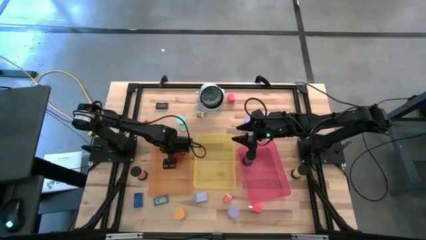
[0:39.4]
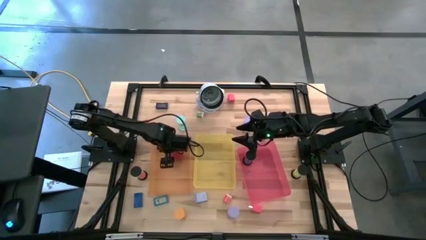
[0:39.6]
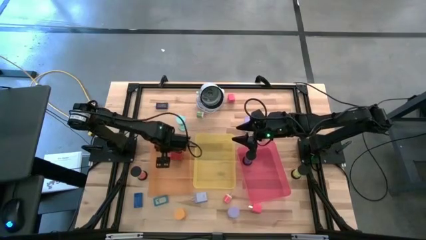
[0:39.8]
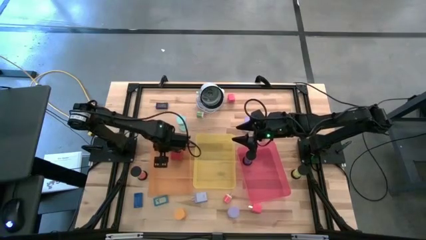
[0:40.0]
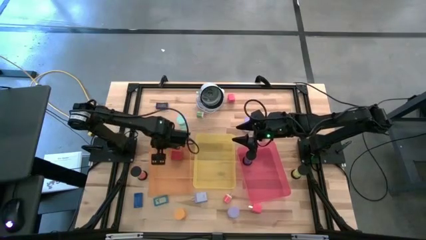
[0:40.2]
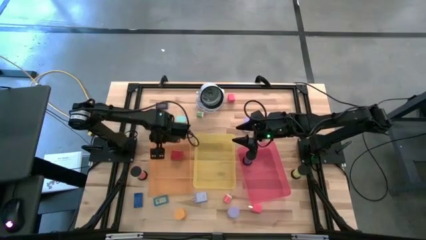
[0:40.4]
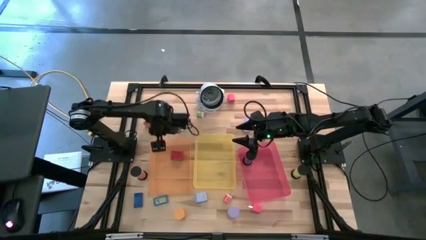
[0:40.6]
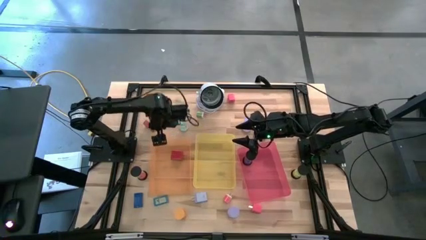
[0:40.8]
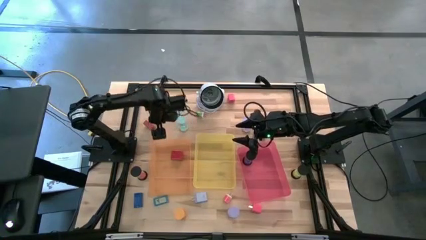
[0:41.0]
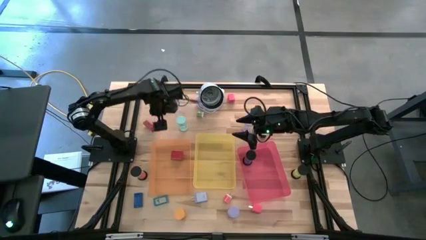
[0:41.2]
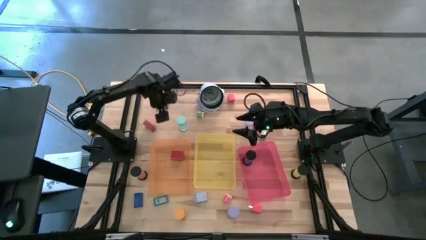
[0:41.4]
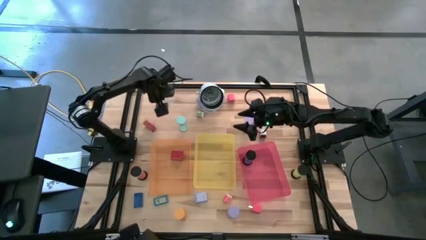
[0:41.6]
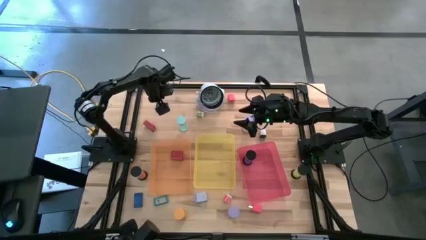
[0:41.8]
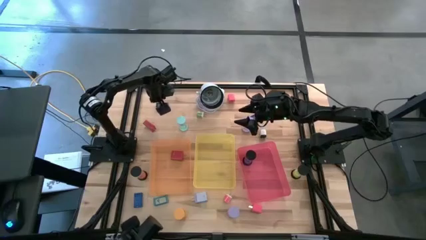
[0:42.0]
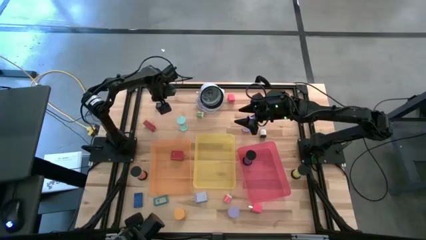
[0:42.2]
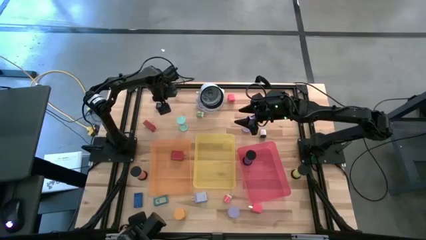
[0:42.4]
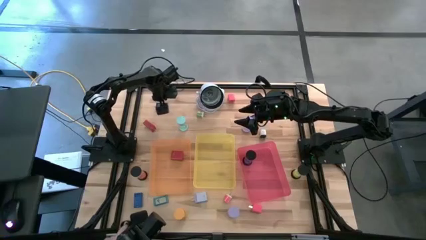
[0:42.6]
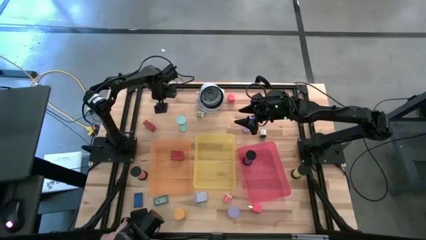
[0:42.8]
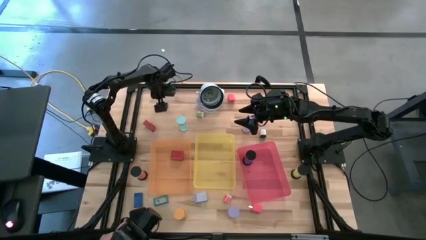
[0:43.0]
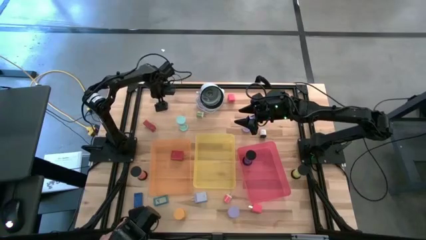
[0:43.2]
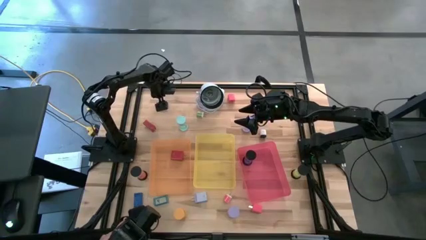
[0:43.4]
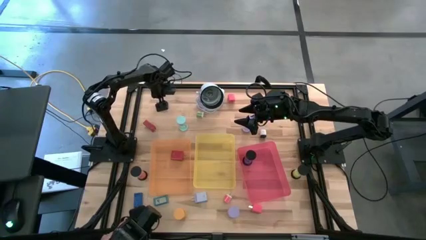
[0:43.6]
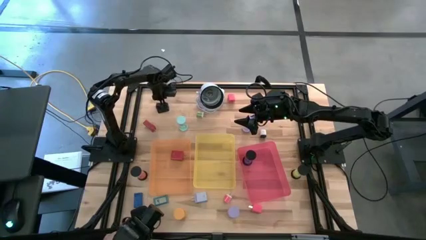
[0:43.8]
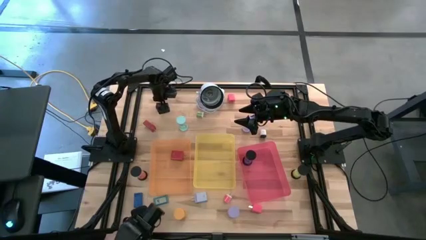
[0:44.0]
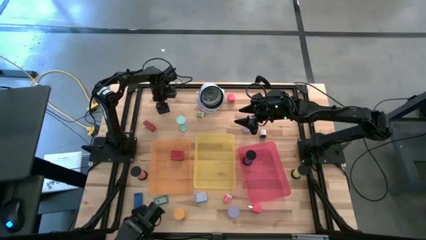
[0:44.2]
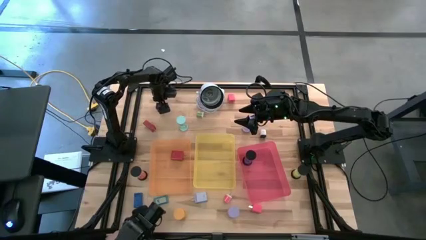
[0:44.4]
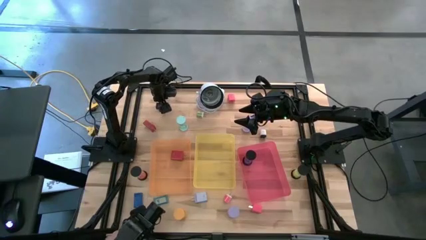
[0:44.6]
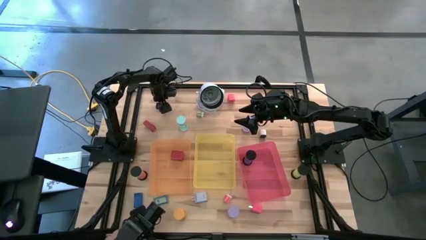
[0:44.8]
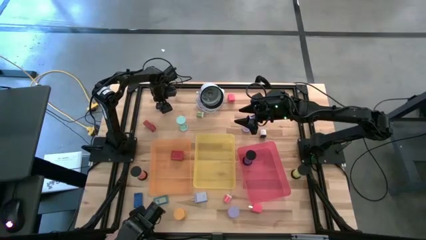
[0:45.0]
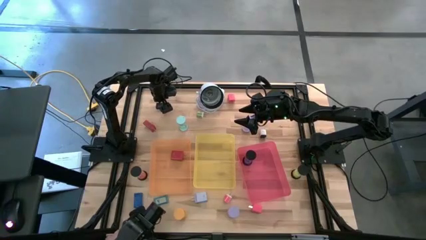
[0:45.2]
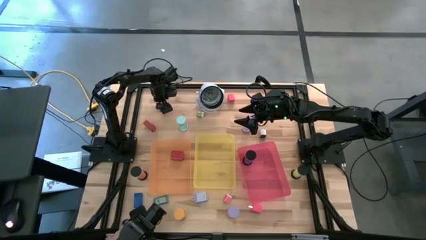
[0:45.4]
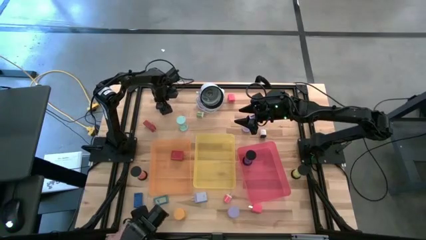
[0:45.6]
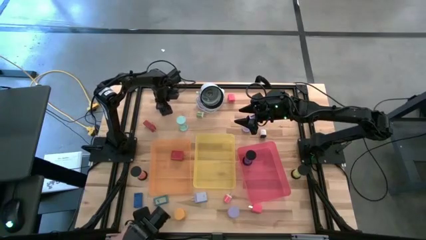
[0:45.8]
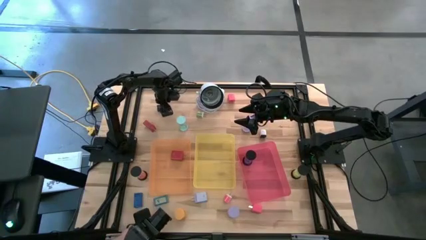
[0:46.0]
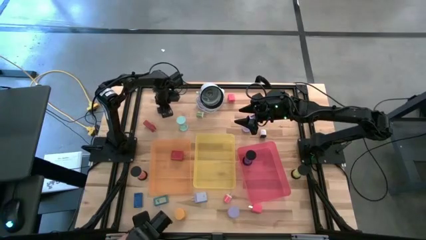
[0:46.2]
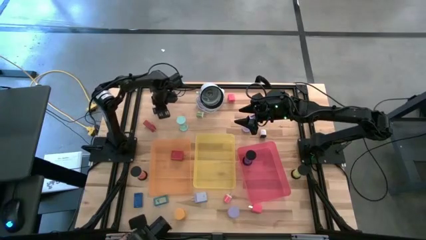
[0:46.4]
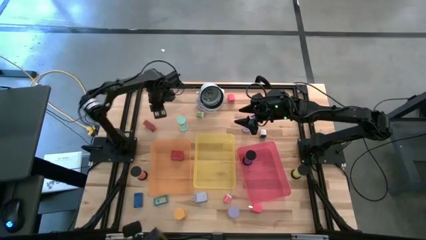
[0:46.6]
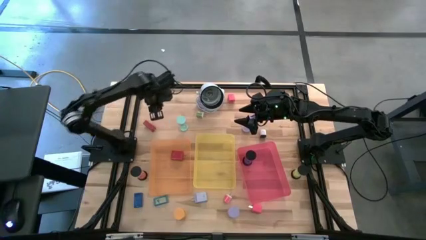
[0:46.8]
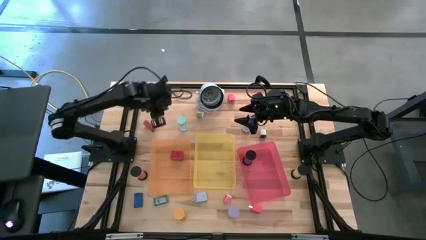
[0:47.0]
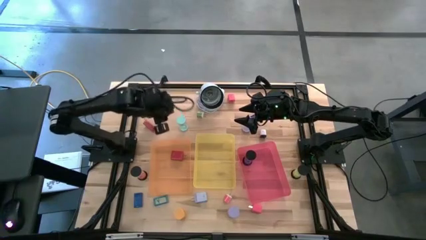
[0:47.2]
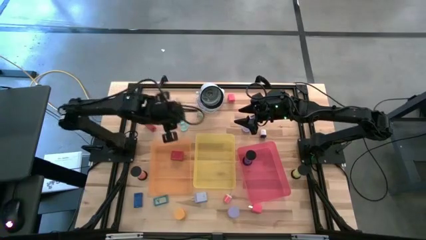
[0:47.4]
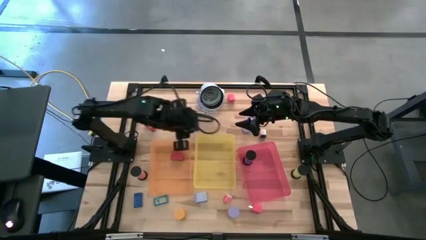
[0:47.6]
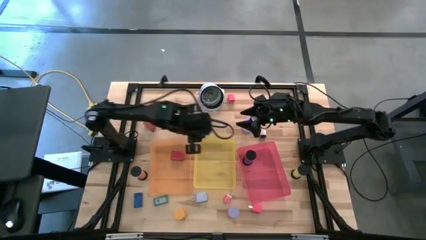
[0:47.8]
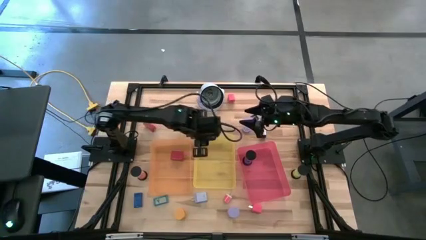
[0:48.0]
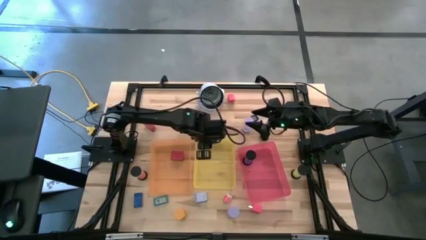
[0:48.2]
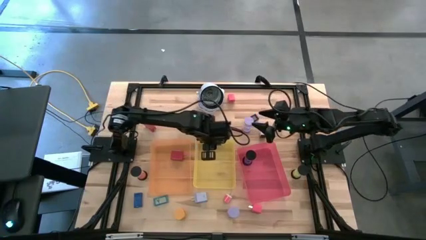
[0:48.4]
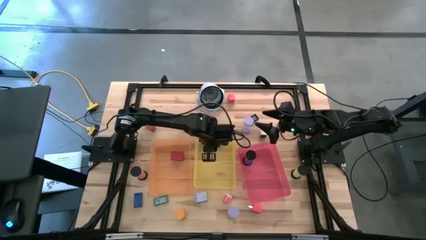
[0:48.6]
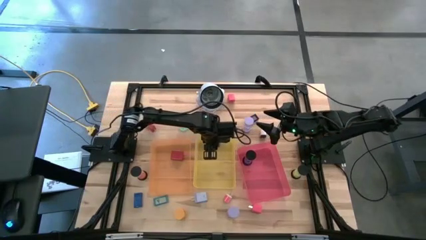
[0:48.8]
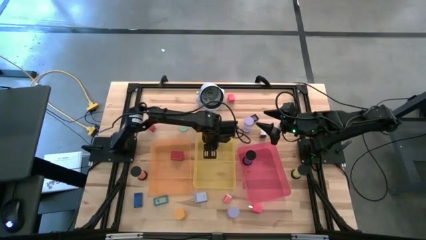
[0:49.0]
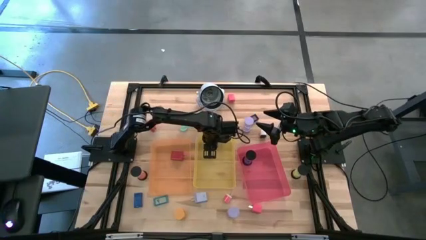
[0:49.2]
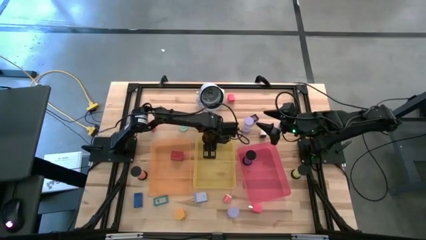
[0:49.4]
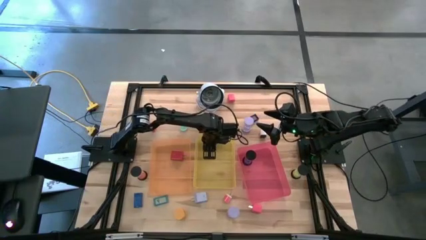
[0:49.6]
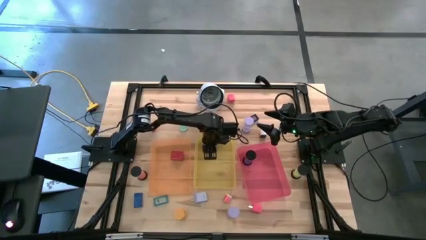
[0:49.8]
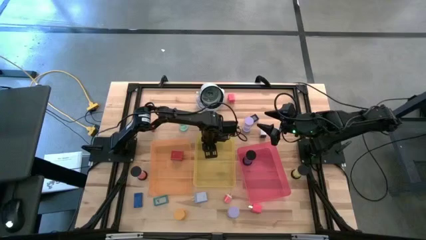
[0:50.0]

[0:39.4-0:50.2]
Task: Pick & Place Office items
Put the blue digital timer into the yellow bin
